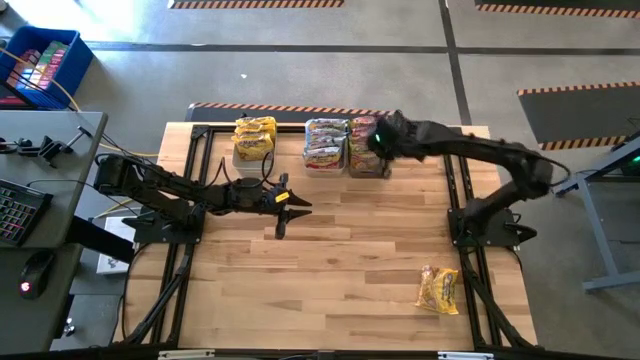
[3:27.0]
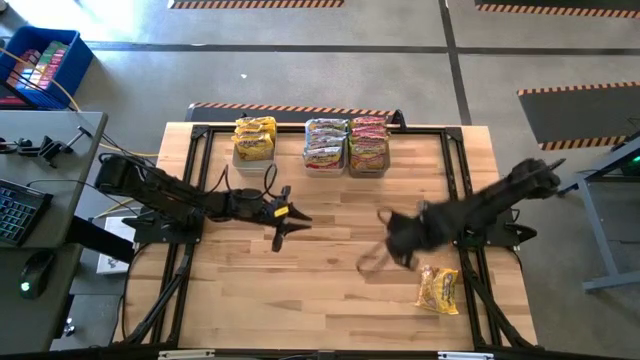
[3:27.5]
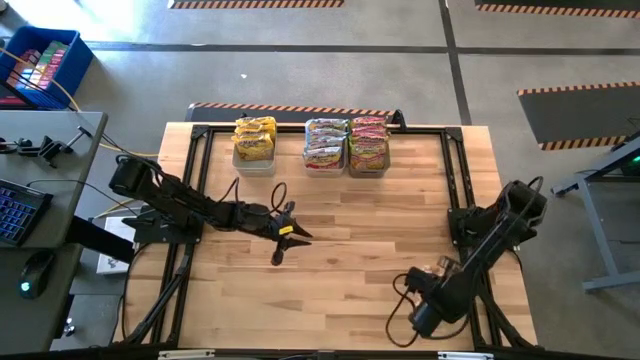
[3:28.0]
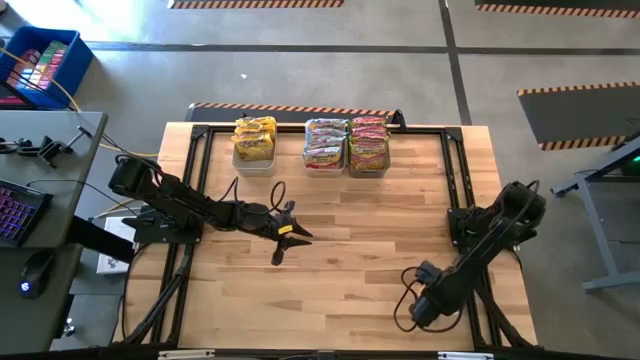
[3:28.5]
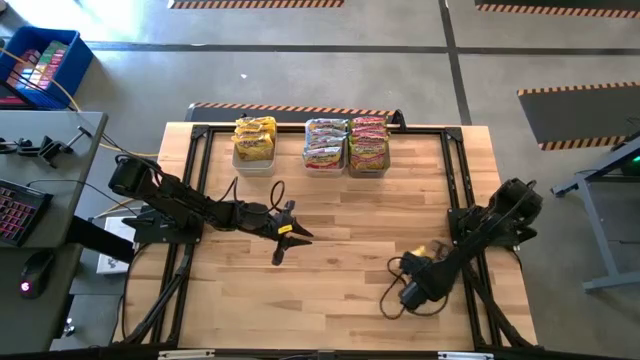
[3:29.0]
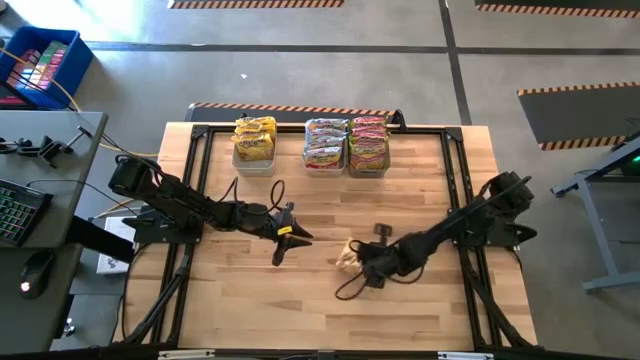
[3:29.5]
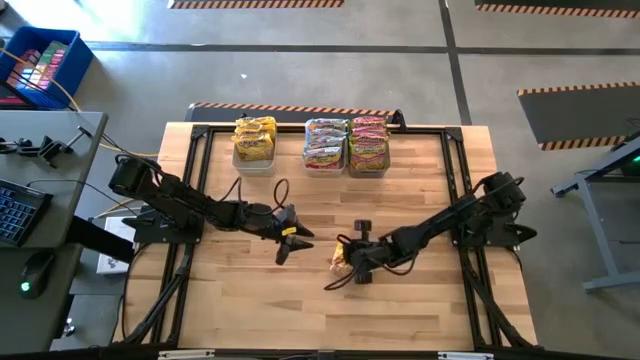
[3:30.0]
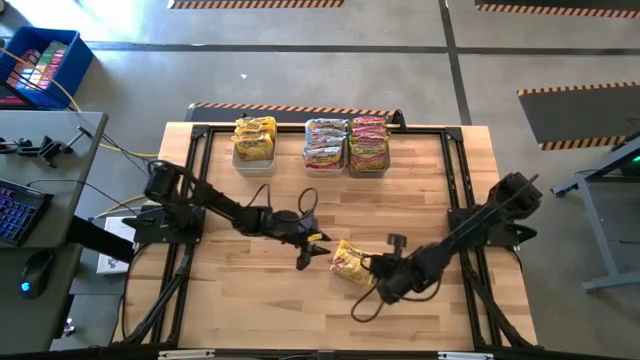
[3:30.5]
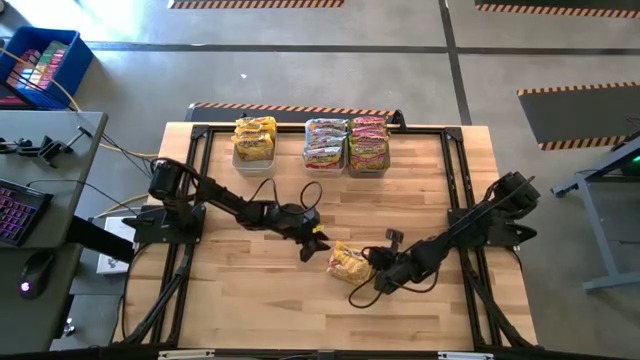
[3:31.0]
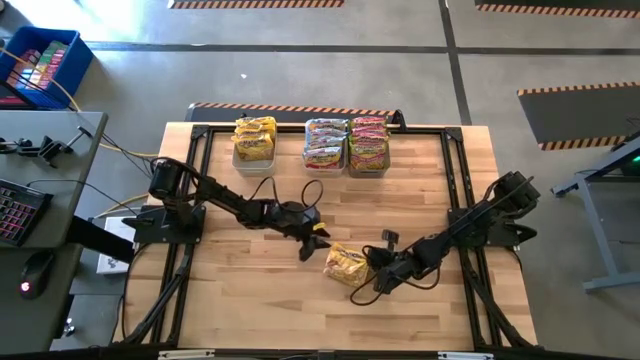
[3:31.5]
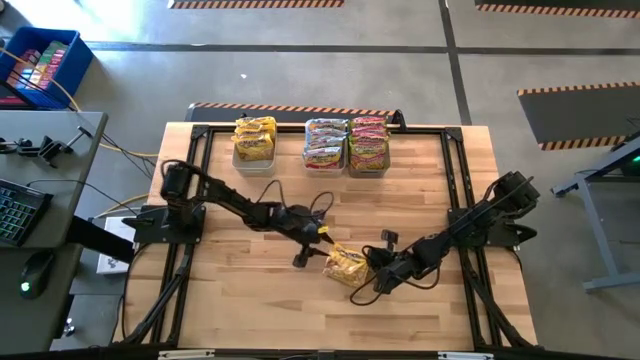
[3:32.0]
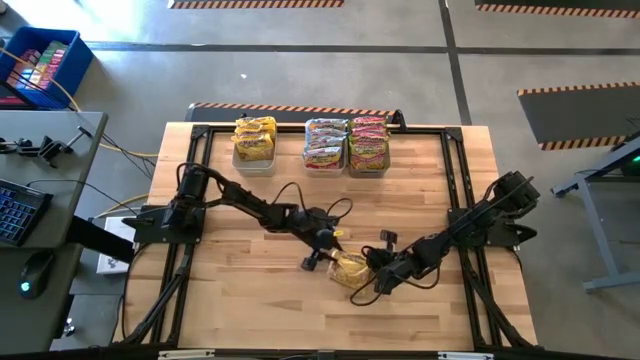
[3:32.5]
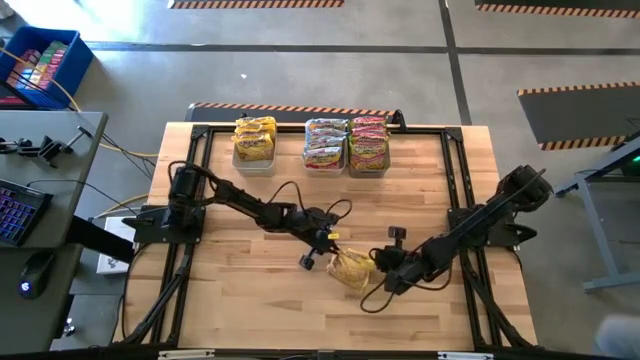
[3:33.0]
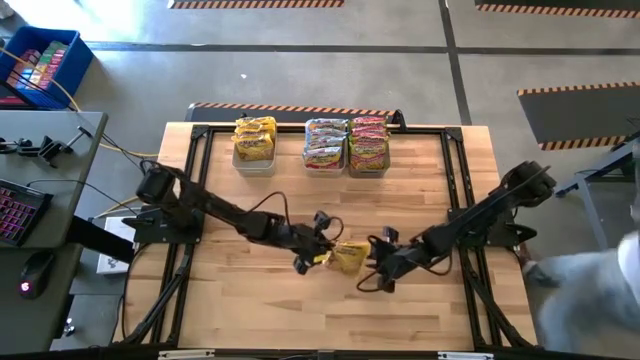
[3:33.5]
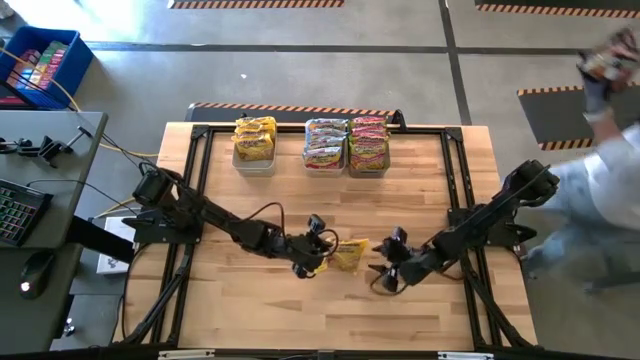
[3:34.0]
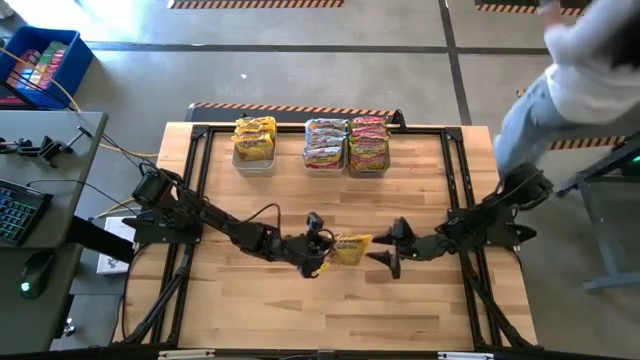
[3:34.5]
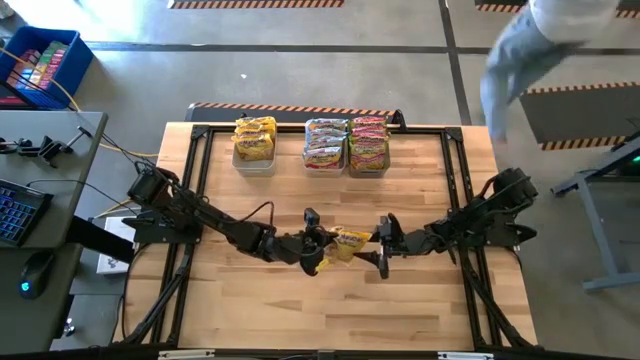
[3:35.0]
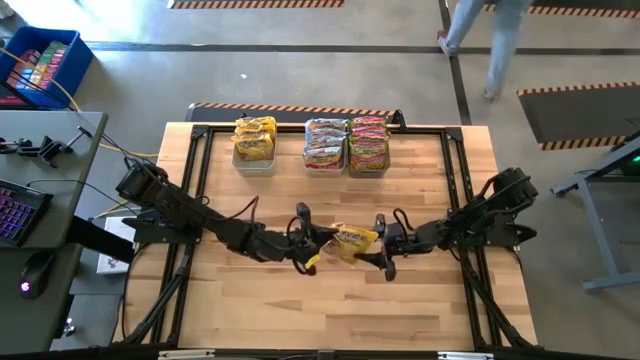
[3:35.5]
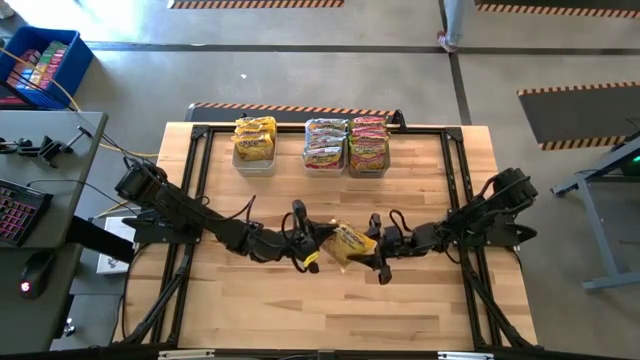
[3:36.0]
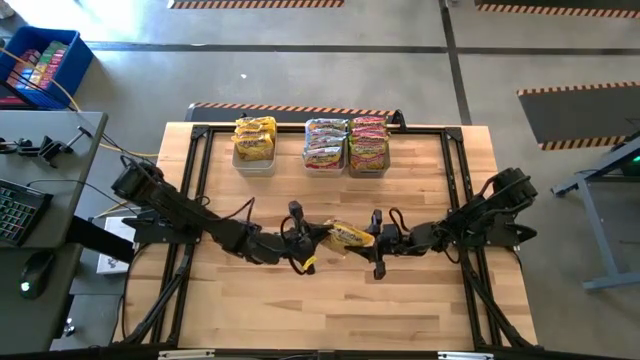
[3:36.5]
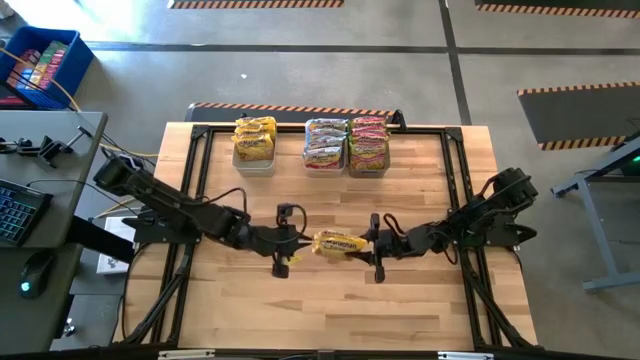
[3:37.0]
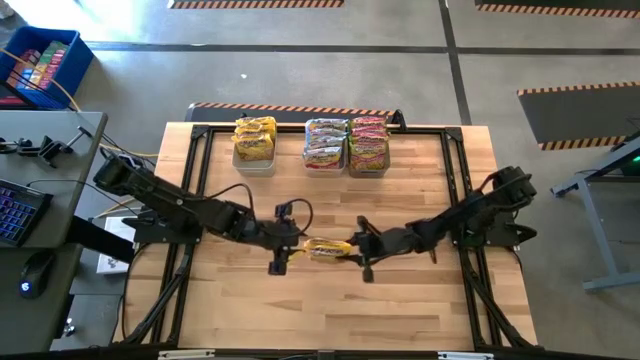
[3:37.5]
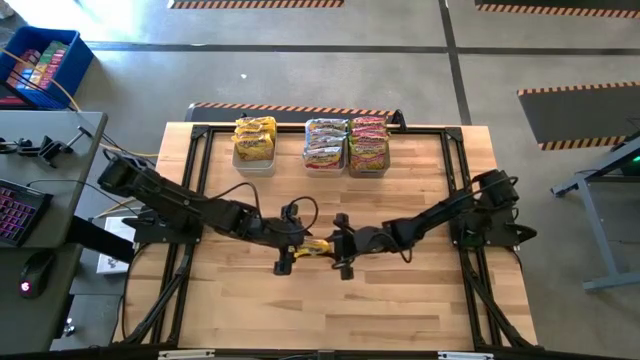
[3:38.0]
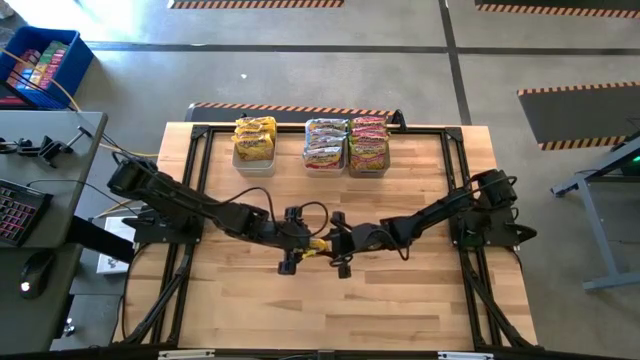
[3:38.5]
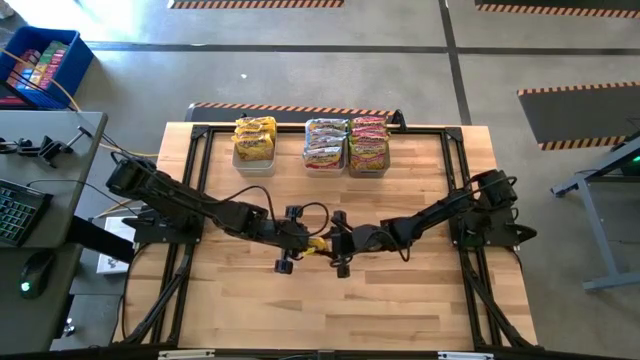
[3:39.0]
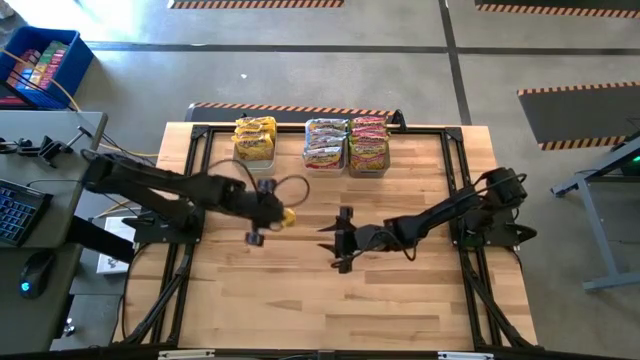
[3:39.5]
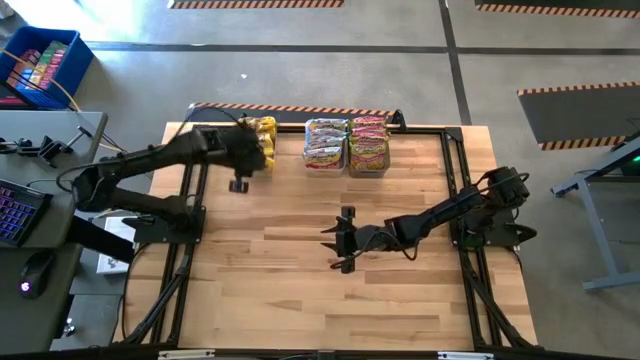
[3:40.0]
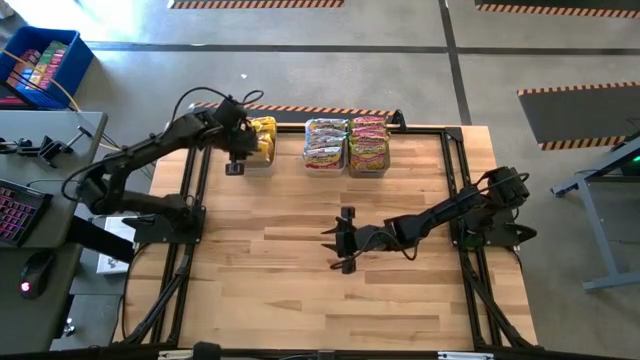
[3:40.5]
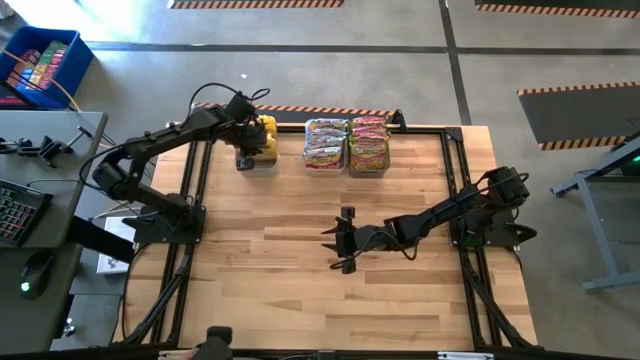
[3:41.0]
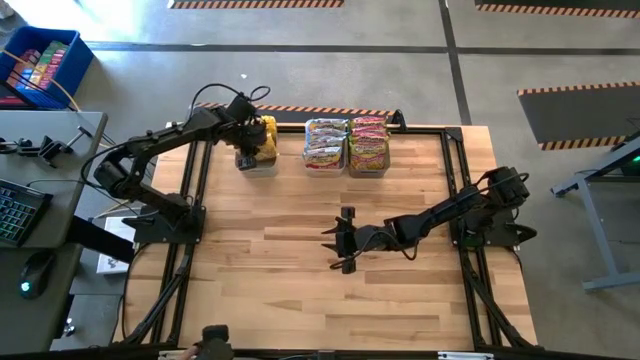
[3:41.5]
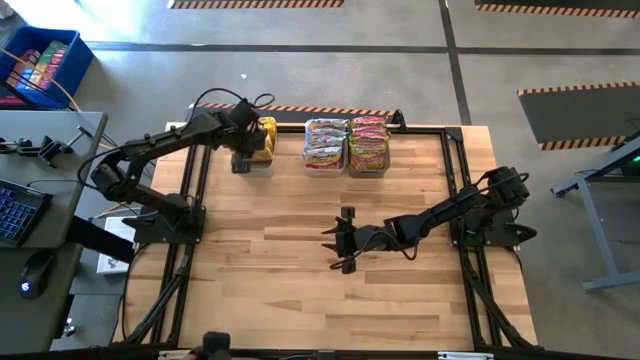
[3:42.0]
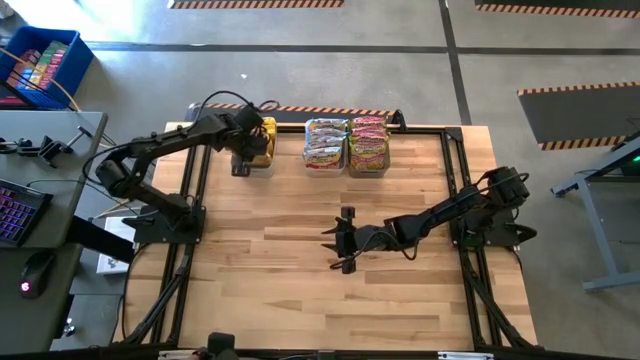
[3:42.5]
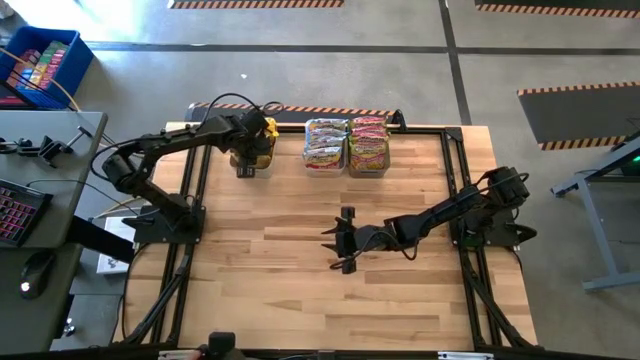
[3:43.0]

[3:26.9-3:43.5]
Task: Sort Maruchan noodles
Put the yellow noodle pack into the gray bin

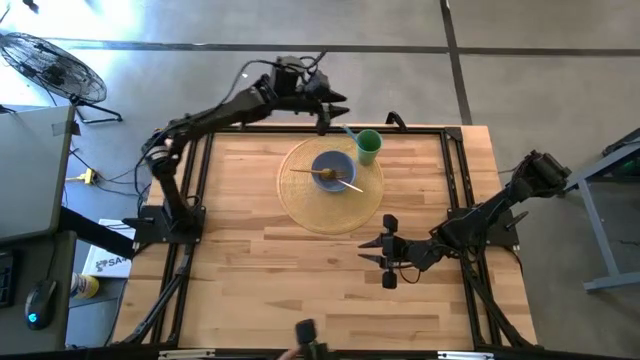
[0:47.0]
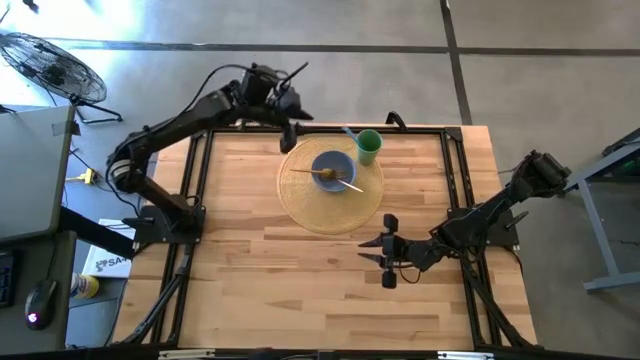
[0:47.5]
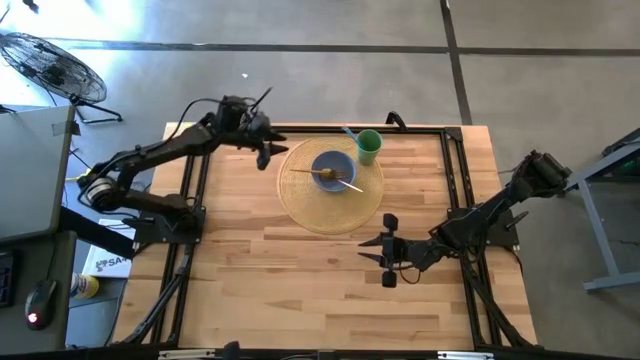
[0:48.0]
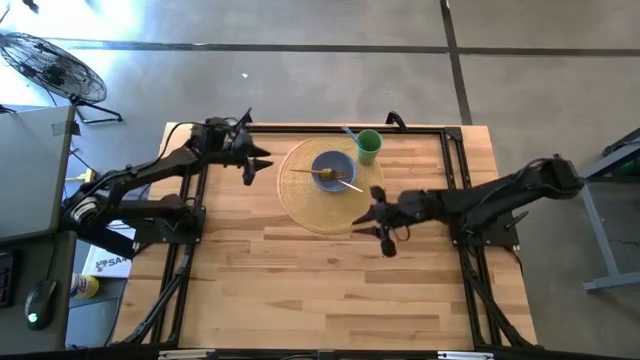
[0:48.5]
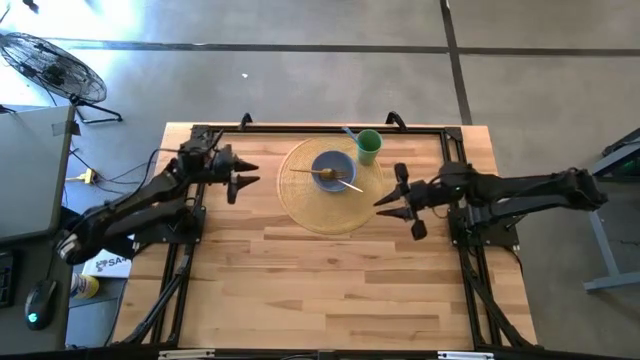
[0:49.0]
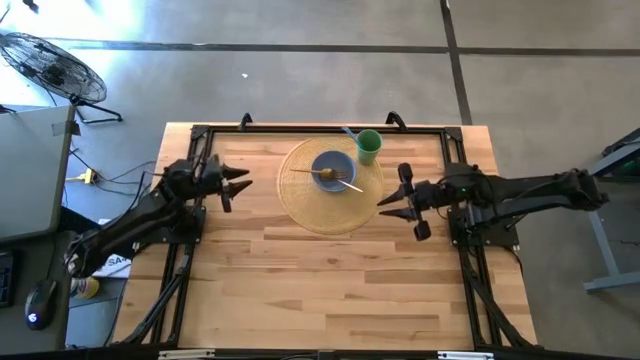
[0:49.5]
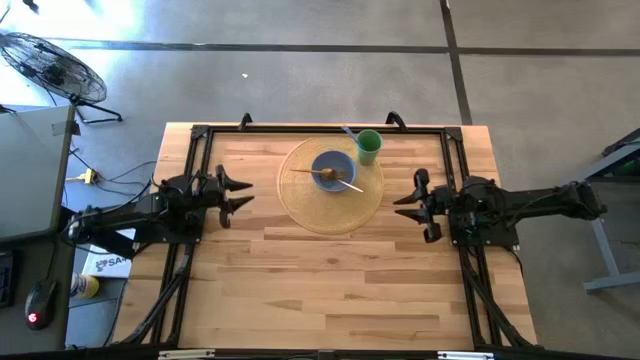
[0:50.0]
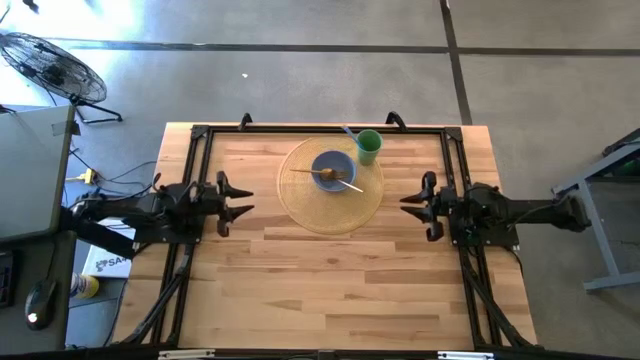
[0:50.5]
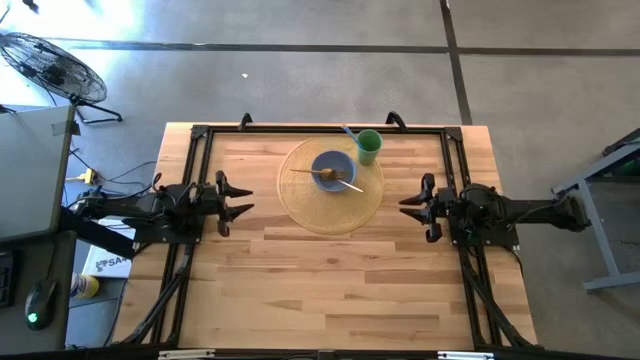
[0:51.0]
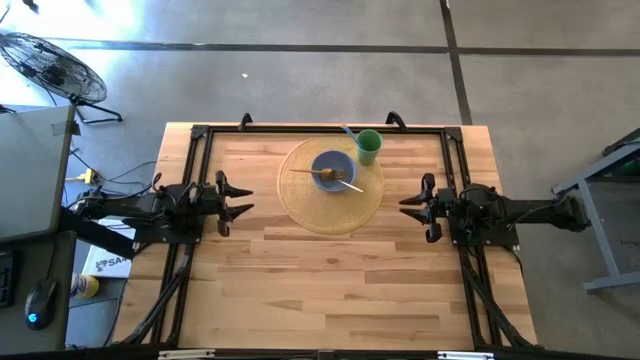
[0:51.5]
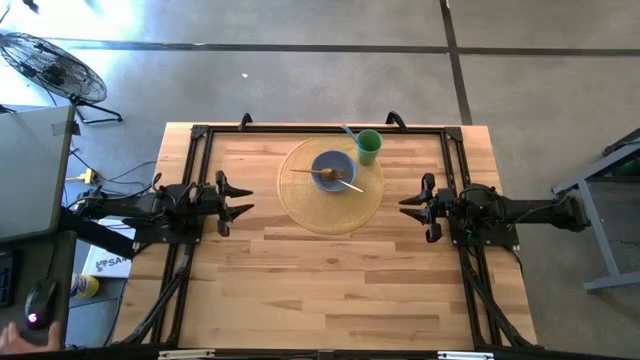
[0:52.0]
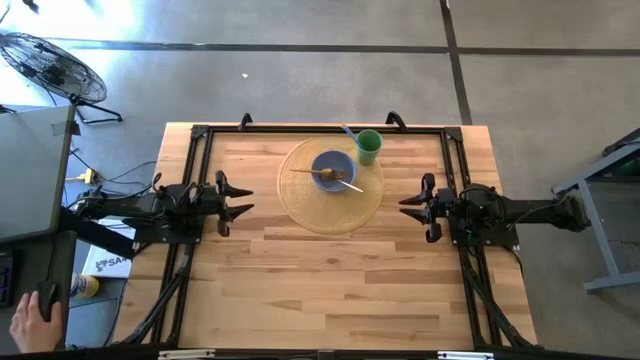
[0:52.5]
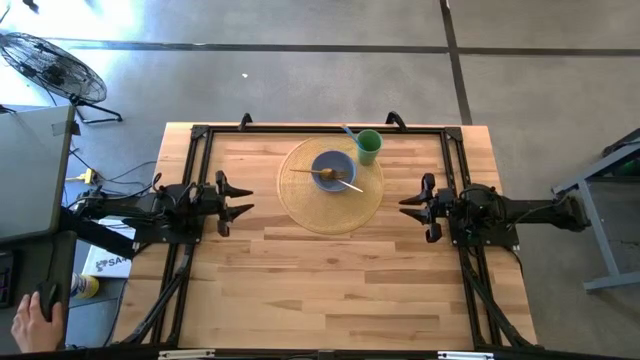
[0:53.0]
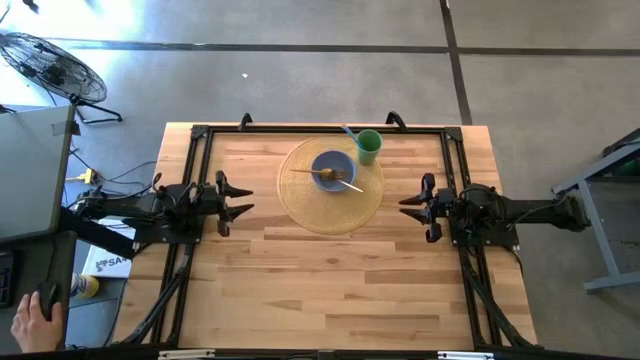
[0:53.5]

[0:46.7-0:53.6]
Task: Pick & Place Utensil
Return to Home Position
